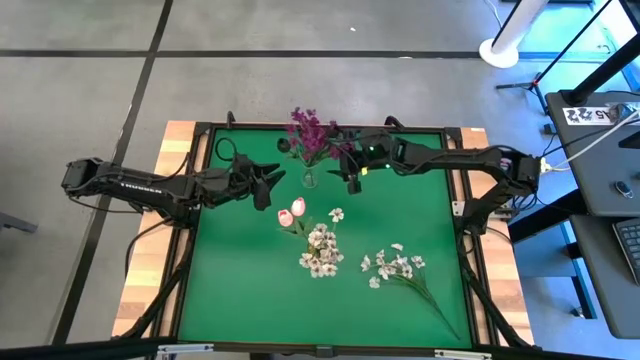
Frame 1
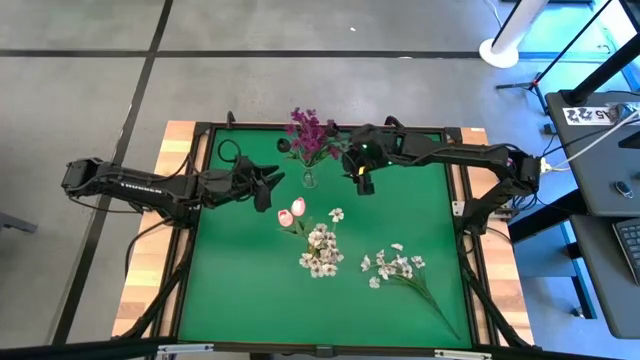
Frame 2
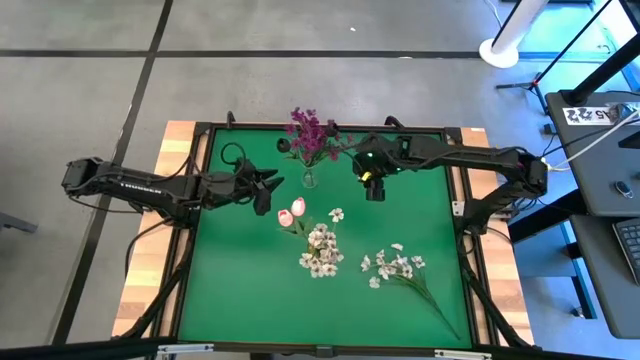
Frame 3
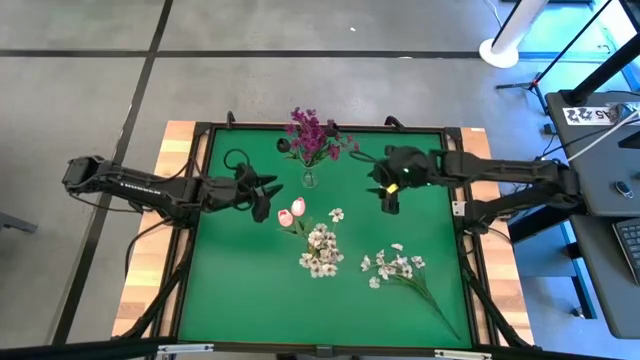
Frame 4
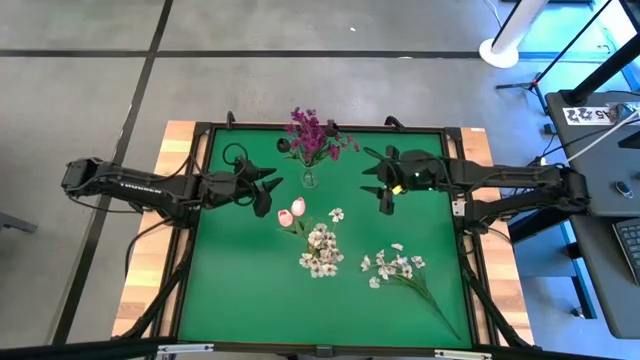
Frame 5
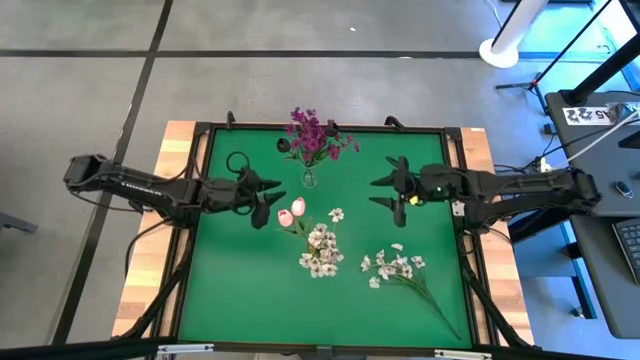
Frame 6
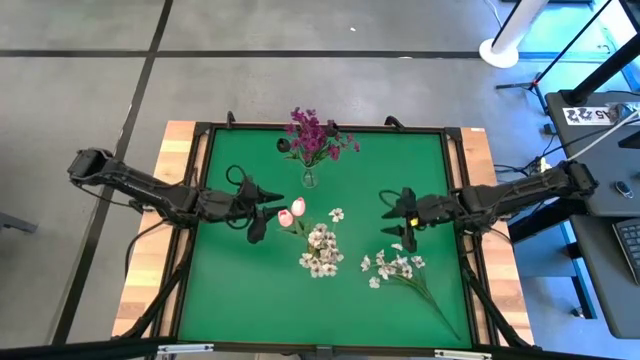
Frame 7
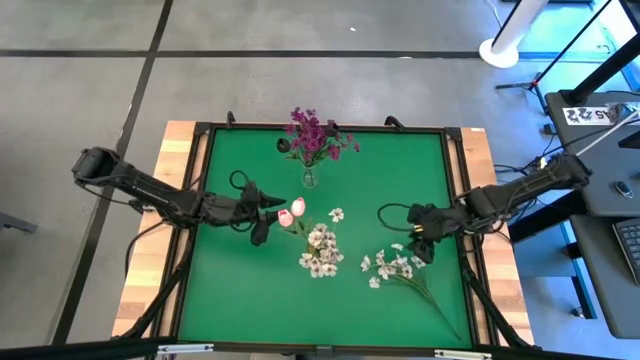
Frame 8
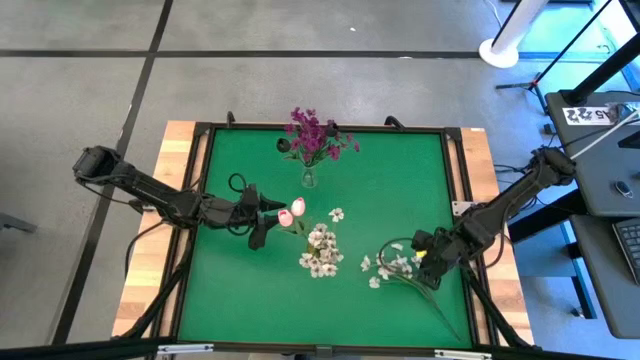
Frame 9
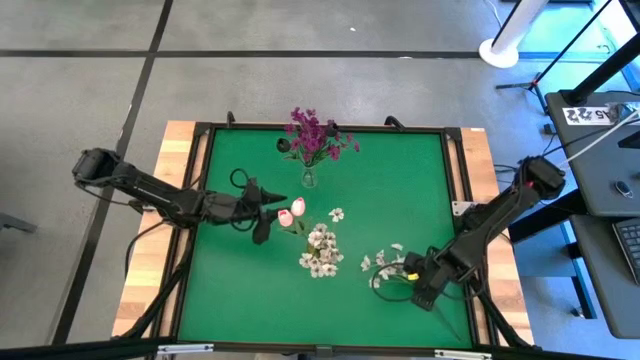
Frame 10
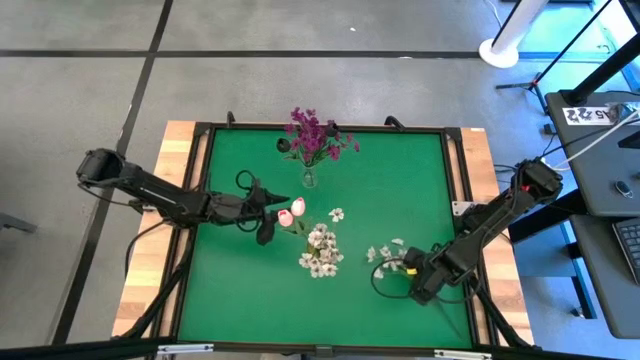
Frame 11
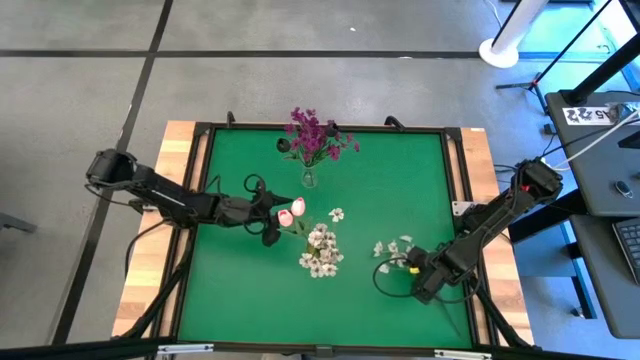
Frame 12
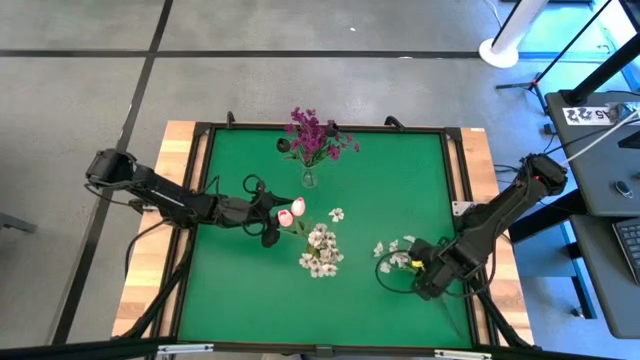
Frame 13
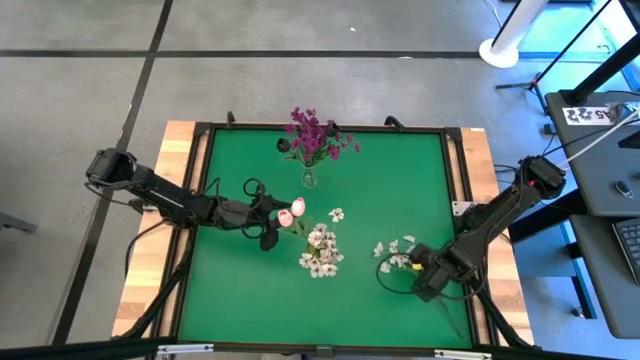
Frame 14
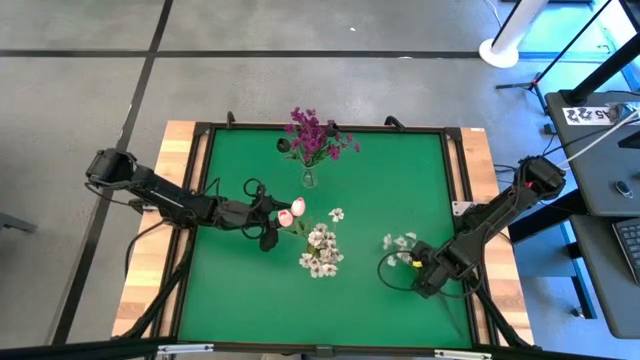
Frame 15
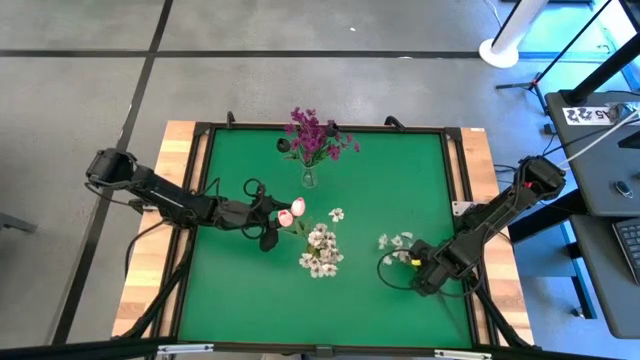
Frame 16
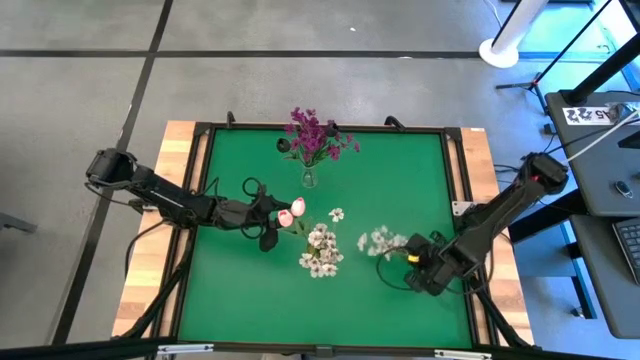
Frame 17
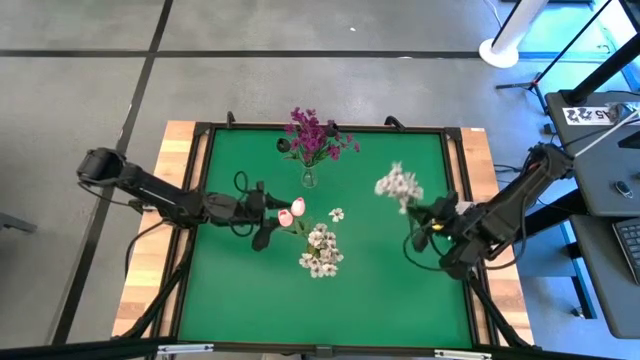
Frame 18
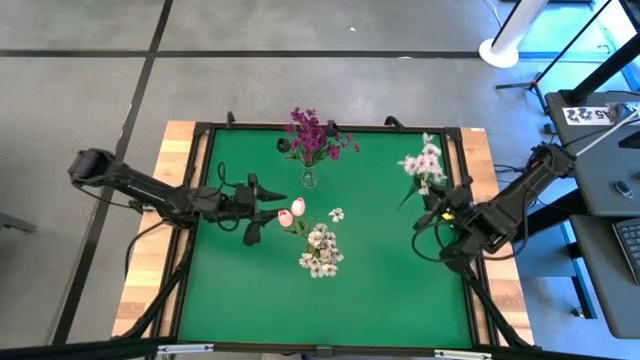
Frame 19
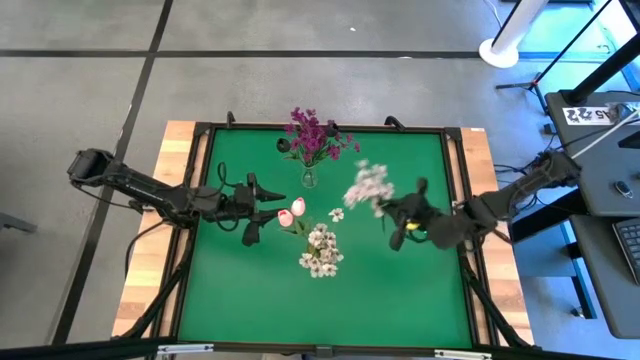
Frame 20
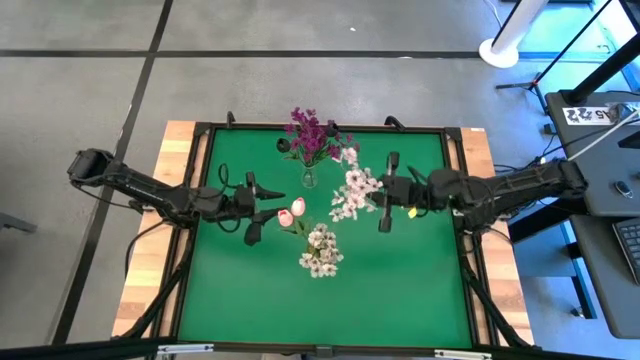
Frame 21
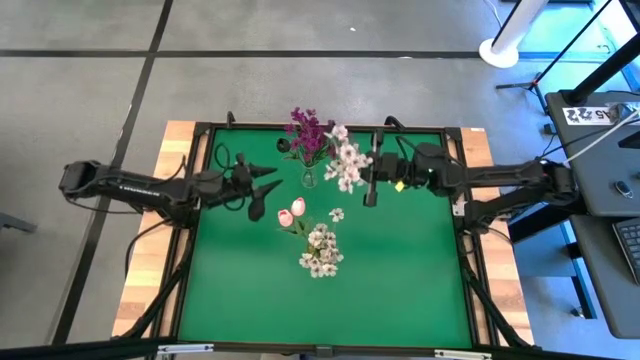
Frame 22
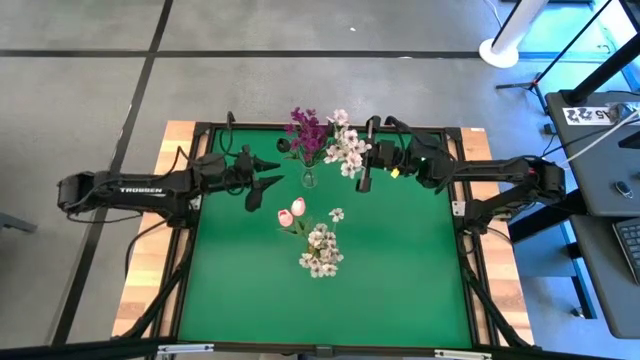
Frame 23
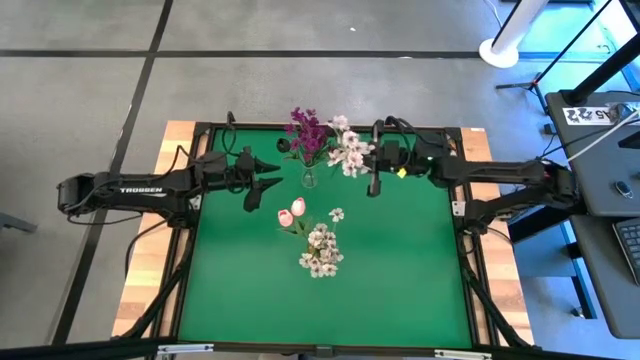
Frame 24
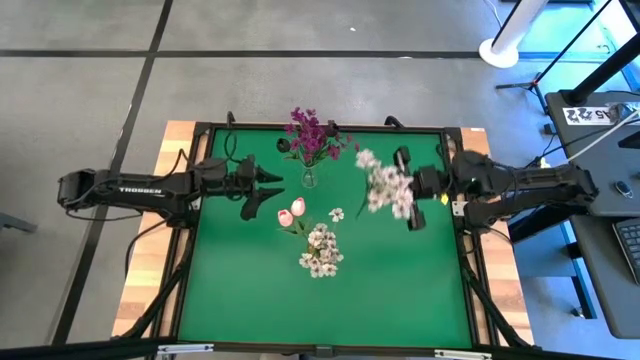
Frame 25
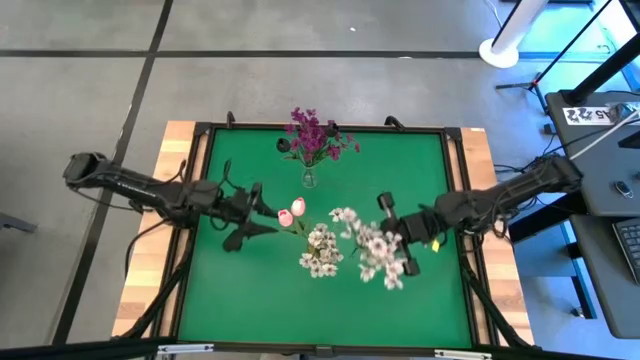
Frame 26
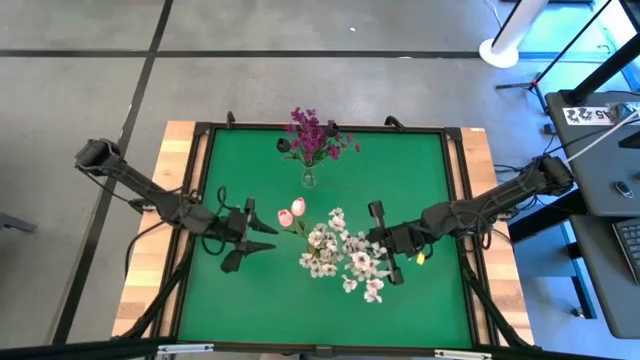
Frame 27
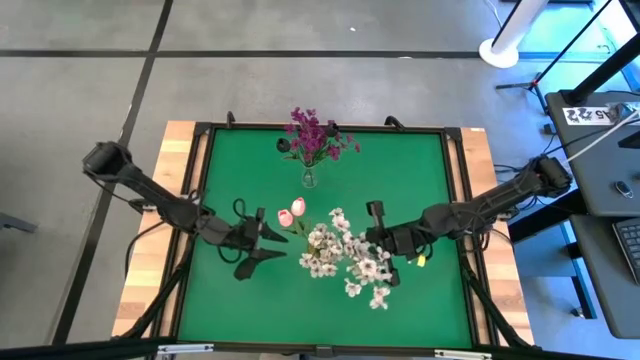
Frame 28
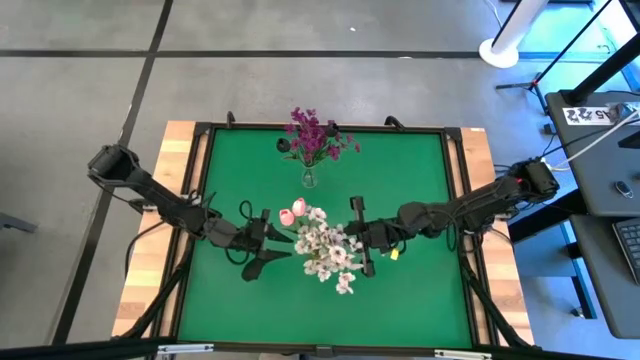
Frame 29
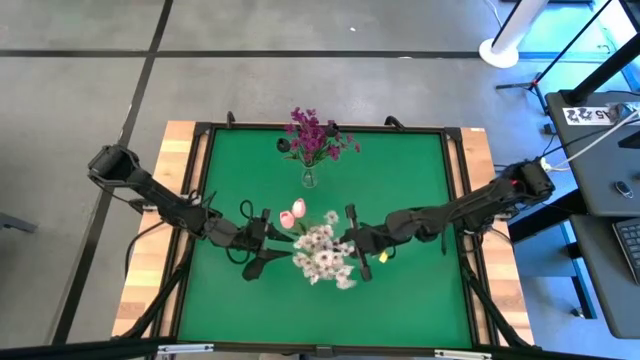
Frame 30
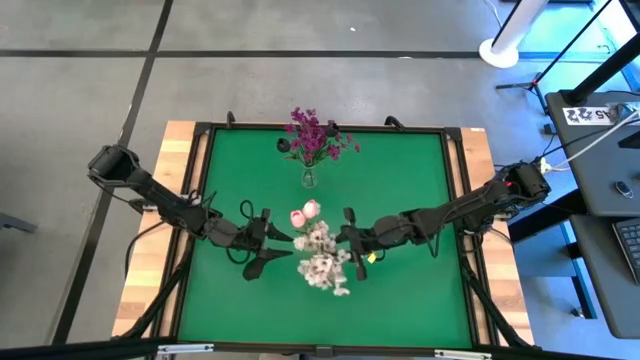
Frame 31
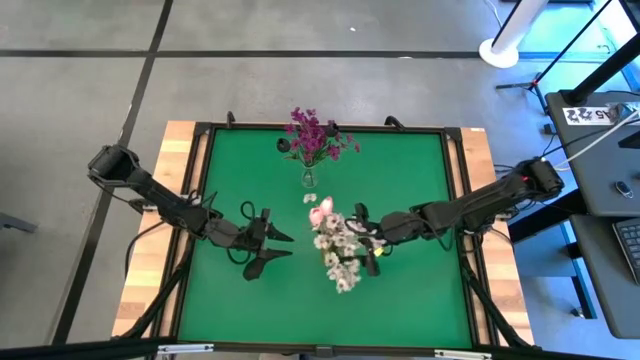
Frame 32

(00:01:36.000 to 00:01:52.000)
Task: Sort flowers into vase by color
Put the white flower into the yellow vase

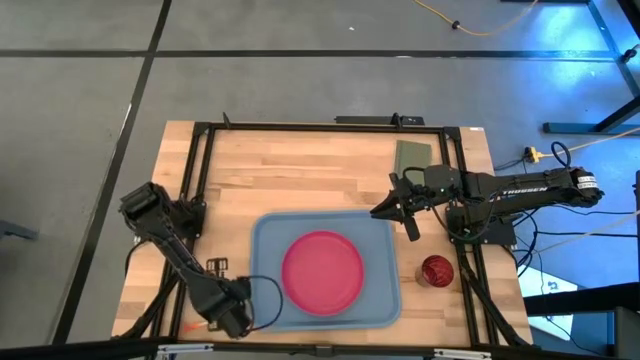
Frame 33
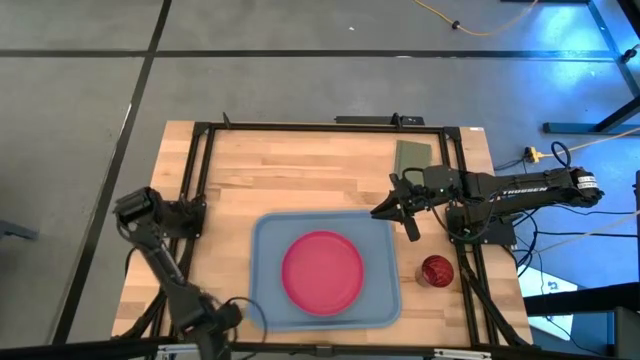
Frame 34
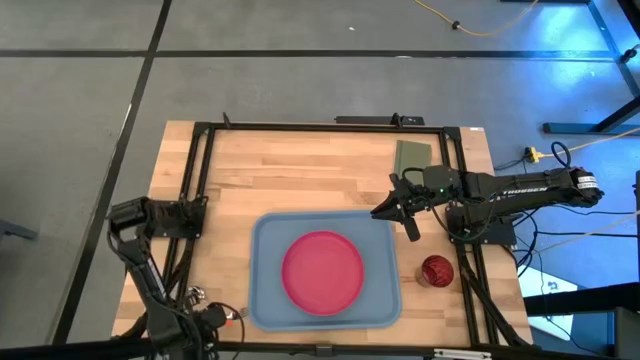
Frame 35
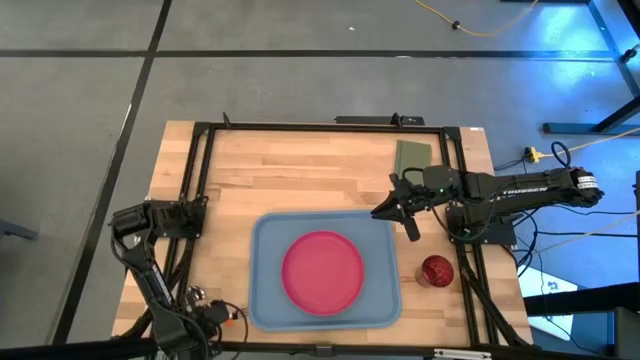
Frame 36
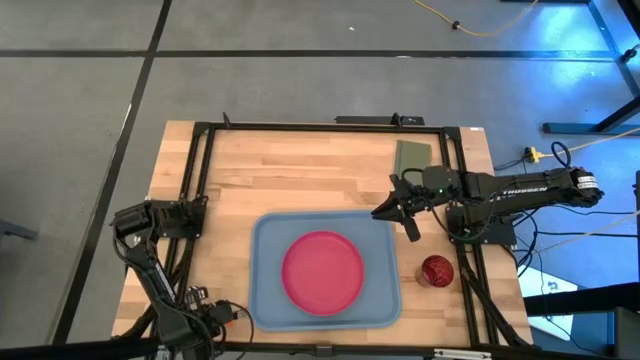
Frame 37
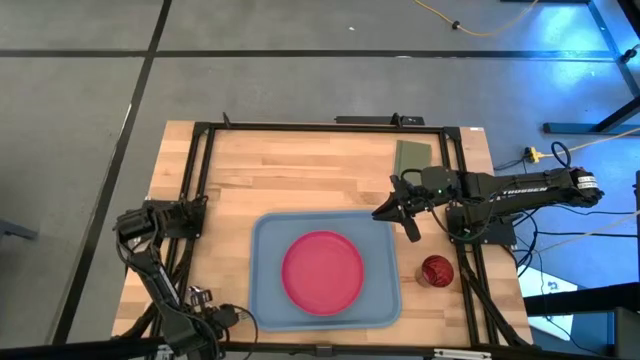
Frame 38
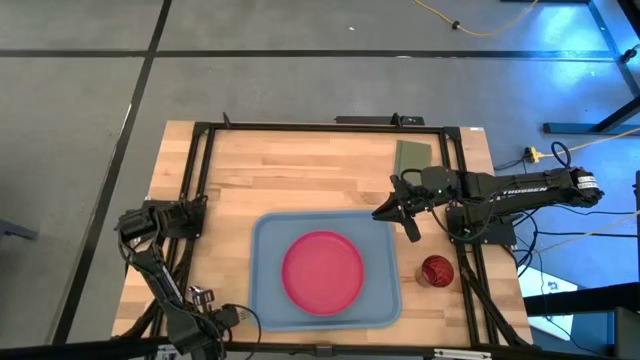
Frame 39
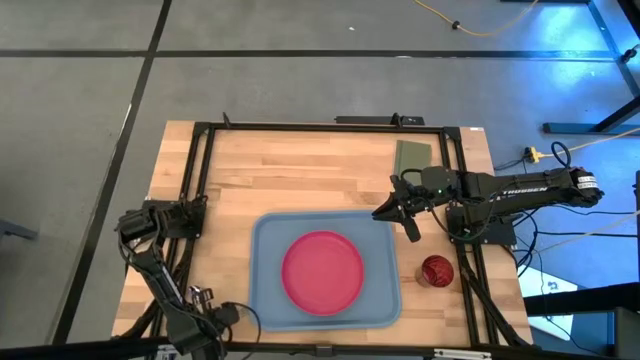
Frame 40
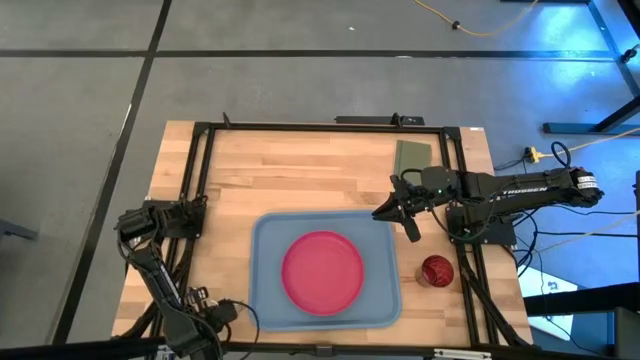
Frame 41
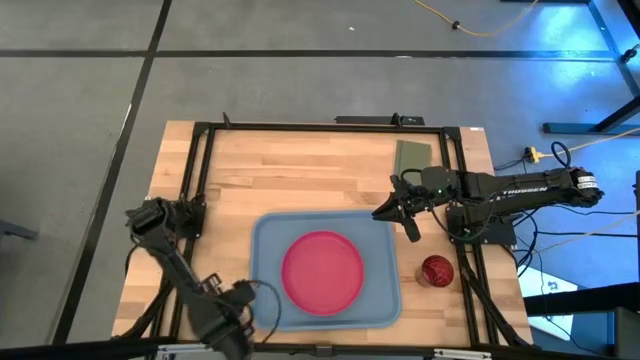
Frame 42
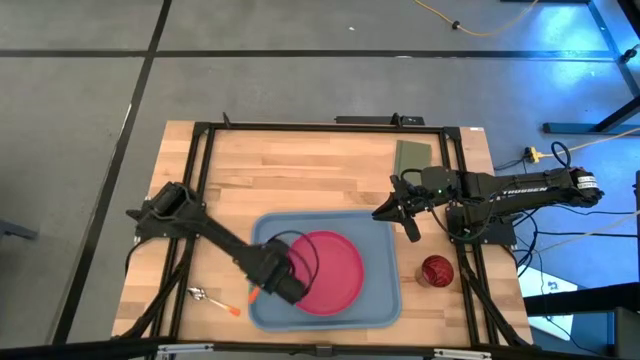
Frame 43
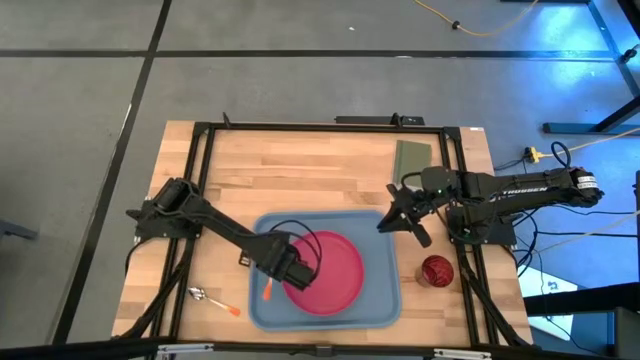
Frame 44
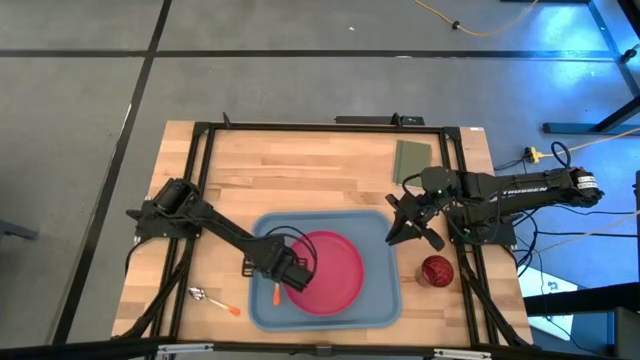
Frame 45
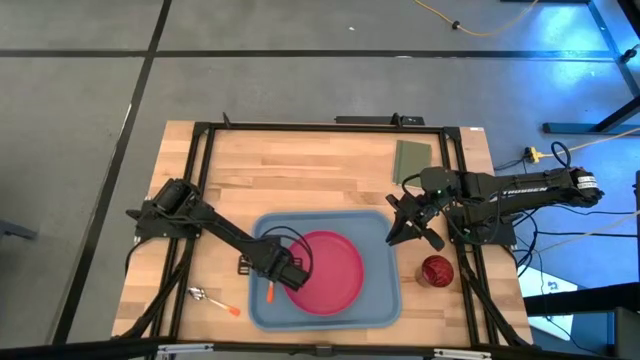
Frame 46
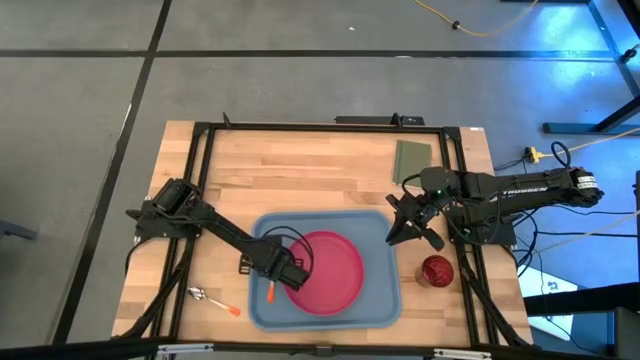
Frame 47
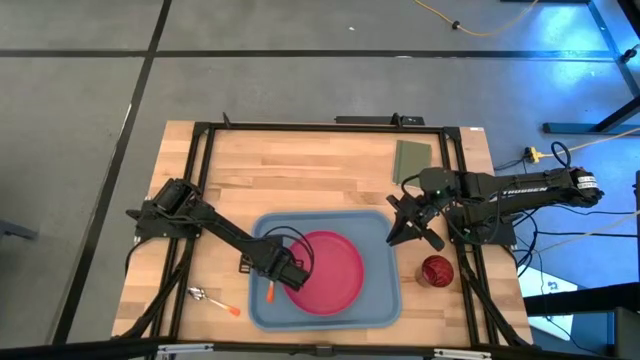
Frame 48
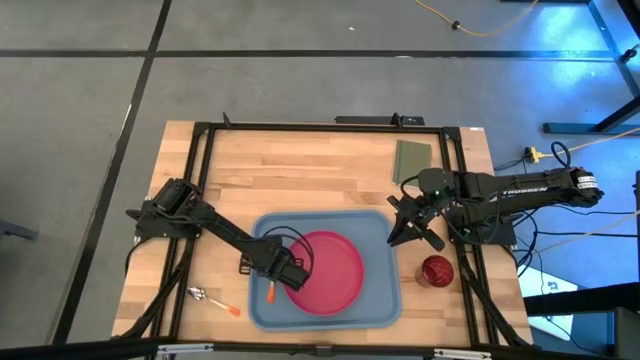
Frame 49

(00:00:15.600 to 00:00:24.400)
Task: Pick and place plate/cup/fork/spoon on tray
Put the orange fork on the blue serving tray to the left side of the pink plate
